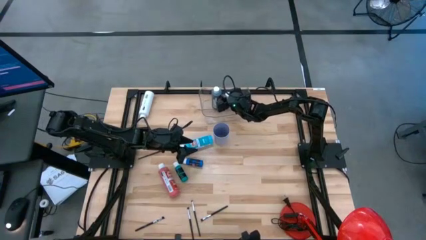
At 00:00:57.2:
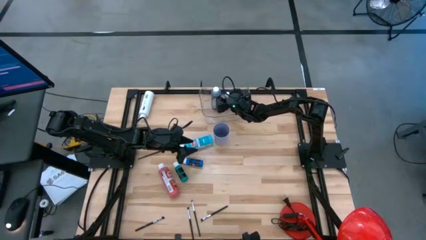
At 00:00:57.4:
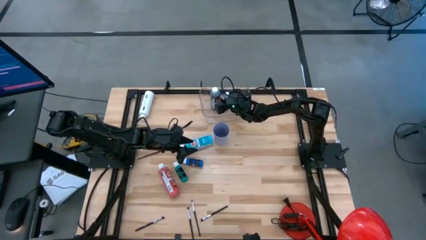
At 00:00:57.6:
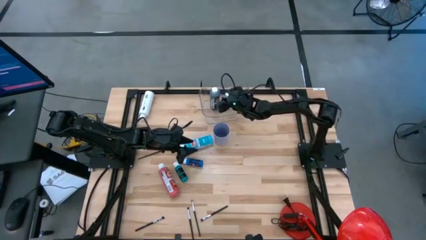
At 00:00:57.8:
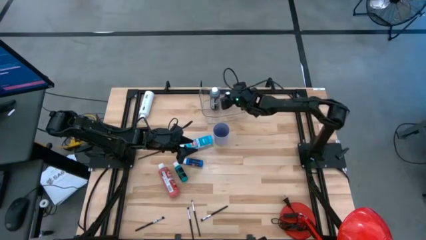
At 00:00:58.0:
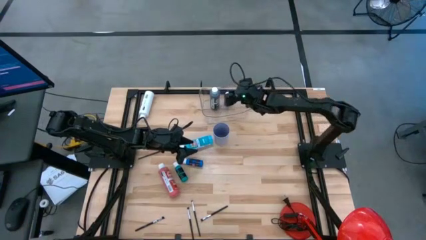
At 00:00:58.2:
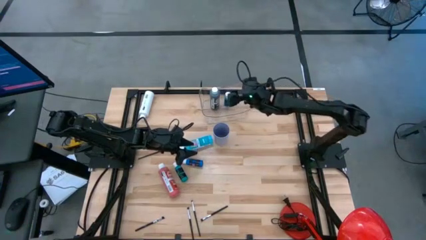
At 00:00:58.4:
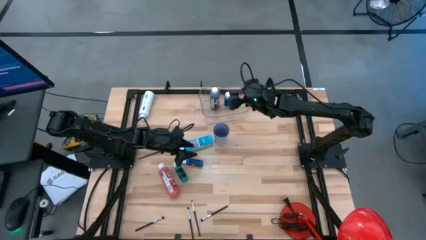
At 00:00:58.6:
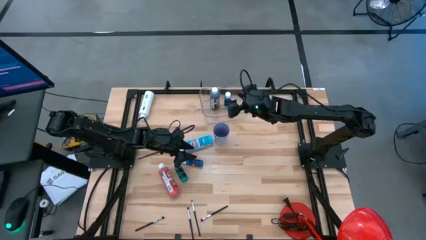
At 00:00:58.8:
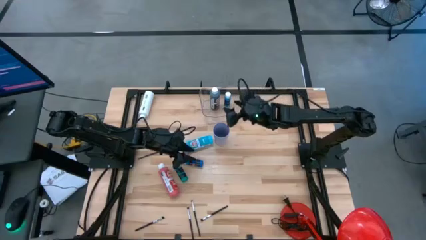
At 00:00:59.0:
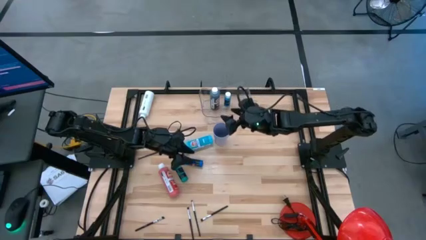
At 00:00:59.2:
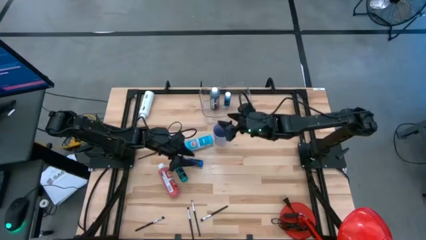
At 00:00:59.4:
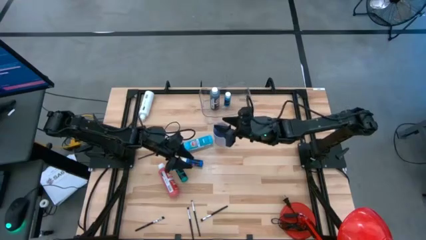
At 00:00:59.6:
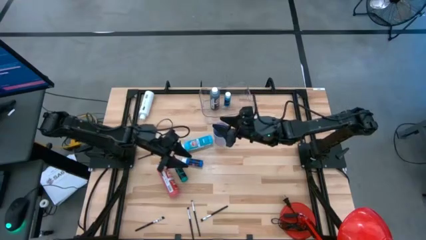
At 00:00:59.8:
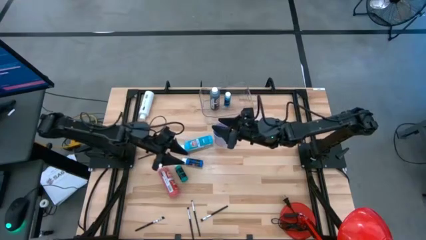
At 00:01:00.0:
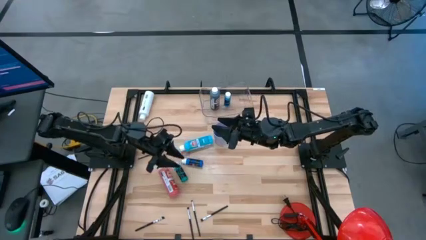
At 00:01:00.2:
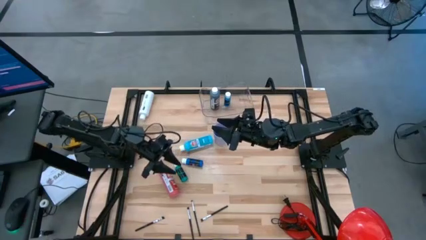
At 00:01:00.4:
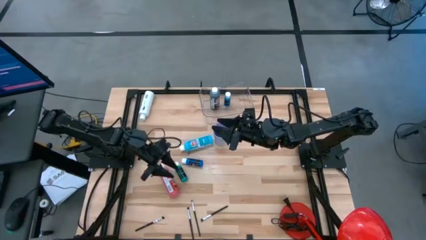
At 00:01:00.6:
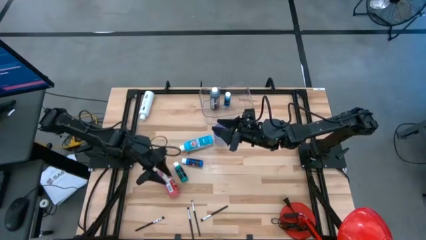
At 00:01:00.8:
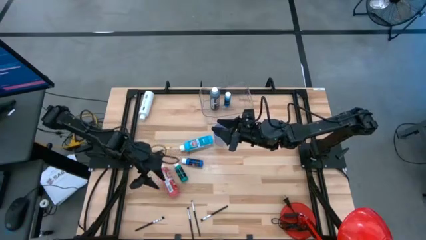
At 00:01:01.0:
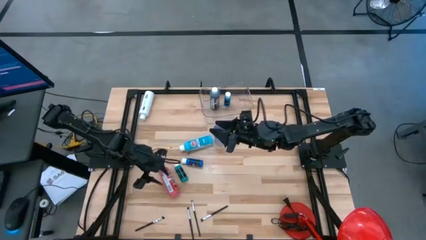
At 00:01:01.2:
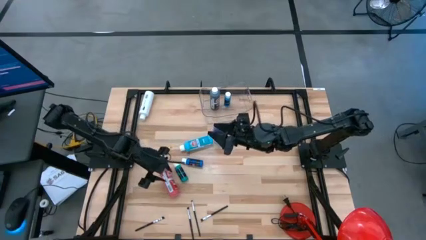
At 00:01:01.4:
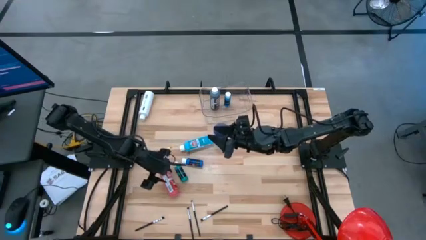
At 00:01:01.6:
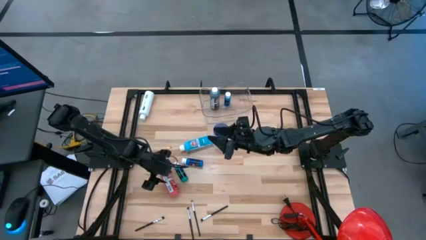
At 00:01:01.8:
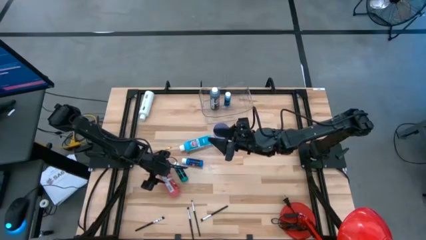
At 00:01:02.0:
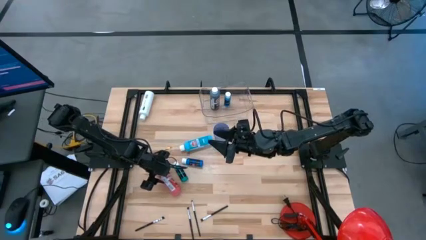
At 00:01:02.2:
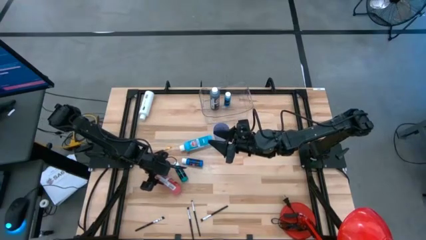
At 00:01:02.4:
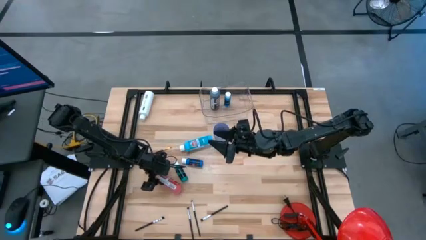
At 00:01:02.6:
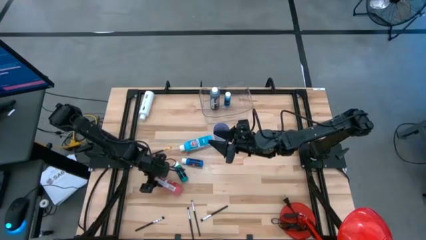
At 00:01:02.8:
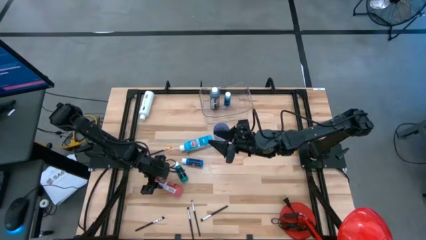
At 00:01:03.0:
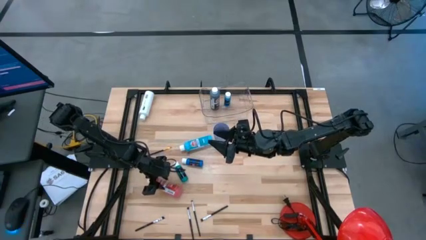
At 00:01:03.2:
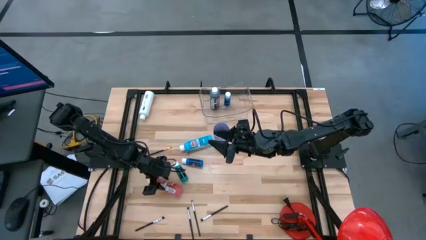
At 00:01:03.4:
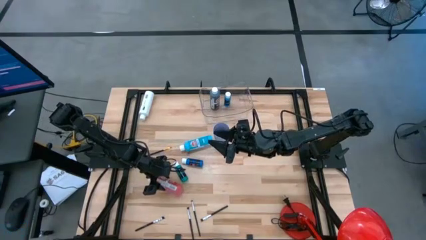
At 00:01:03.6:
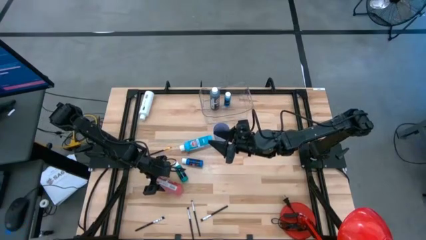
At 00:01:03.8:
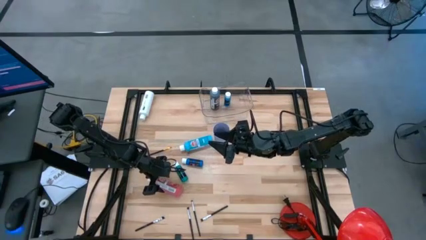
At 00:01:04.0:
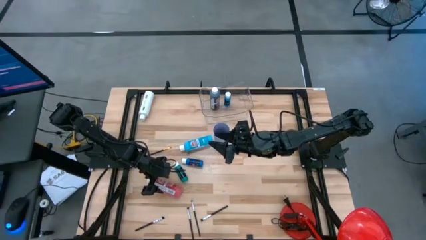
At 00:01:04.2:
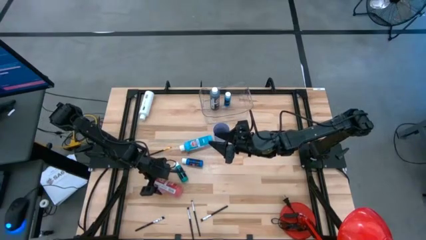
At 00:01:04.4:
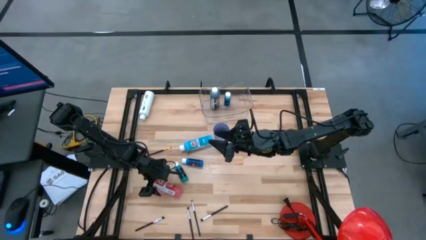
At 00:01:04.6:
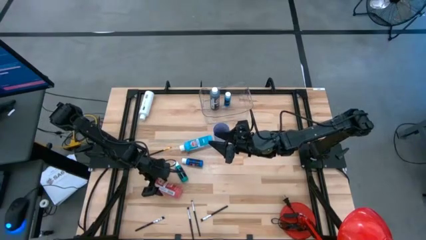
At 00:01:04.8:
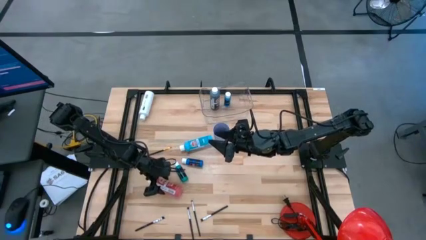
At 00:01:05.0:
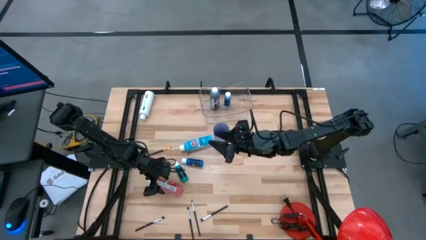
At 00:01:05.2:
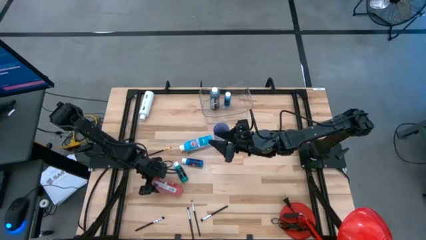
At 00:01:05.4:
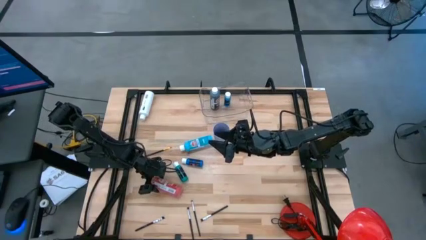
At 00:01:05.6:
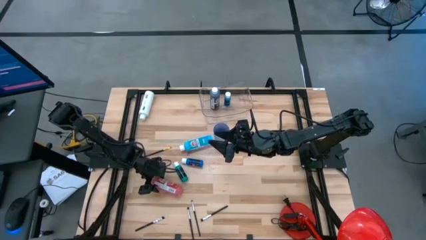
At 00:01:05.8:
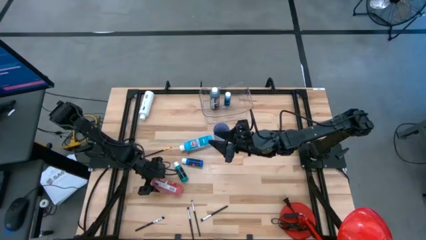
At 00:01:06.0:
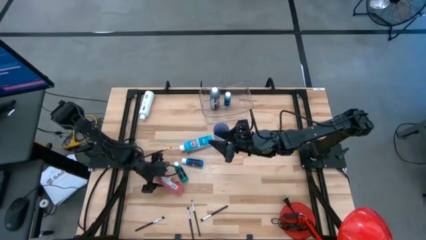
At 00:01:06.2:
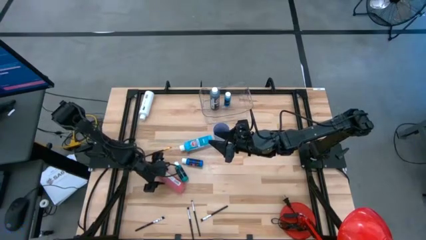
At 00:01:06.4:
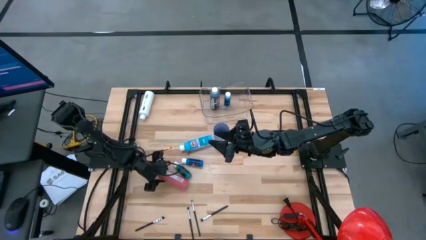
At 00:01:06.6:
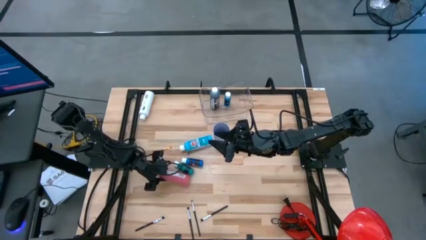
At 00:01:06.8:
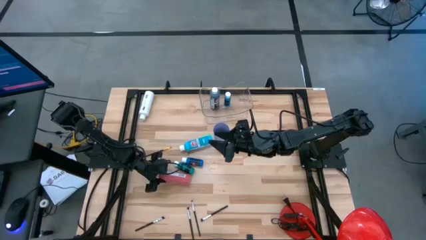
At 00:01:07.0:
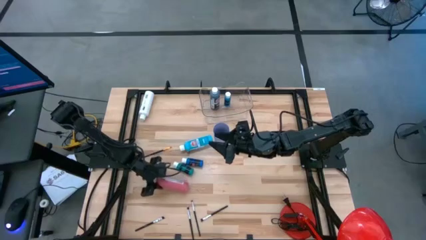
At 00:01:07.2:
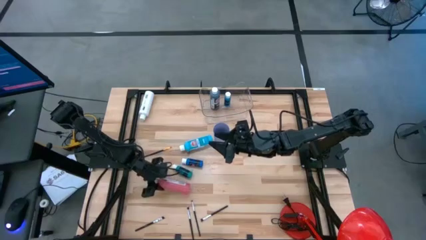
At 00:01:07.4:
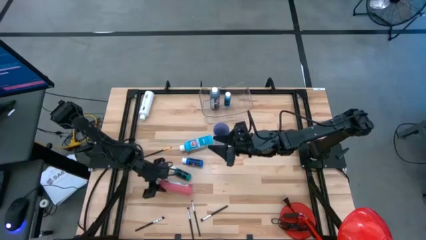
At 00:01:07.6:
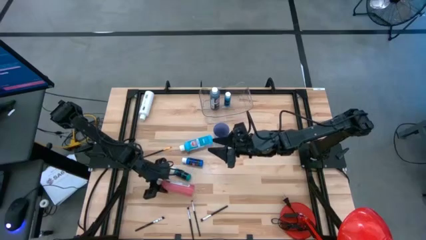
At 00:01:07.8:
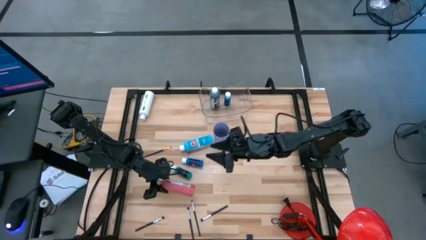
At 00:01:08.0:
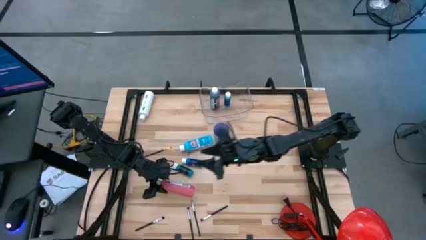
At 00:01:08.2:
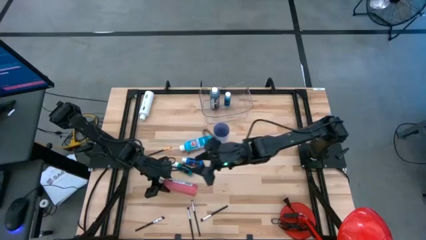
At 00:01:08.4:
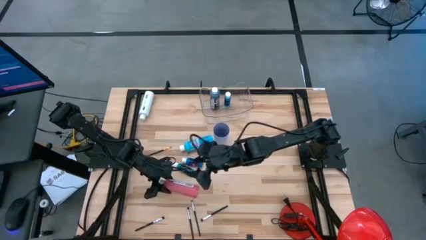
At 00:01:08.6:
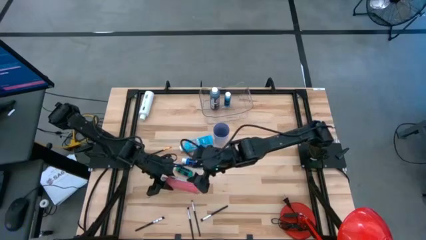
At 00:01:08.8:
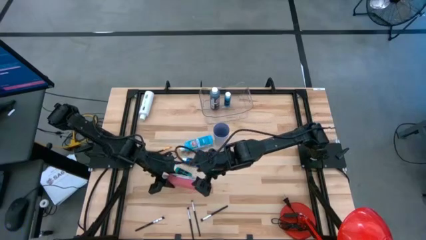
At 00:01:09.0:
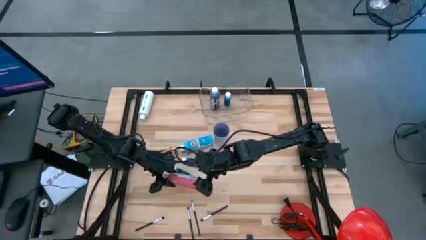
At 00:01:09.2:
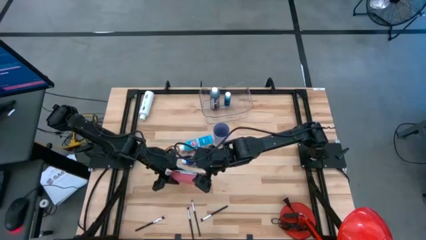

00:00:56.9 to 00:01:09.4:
Task: Pick & Place Paint Supplies
Put the red paint bottle into the transparent bin

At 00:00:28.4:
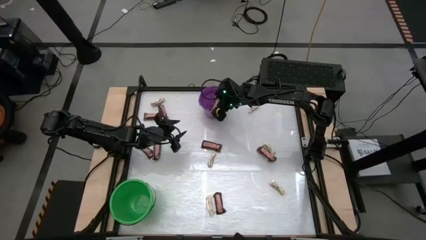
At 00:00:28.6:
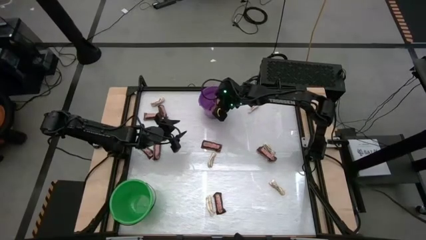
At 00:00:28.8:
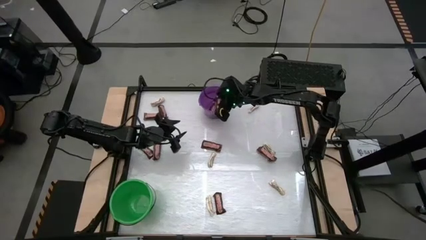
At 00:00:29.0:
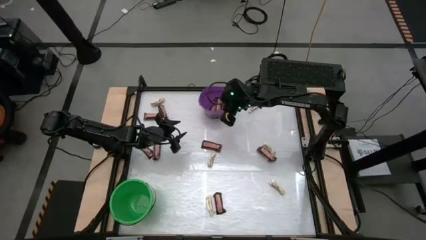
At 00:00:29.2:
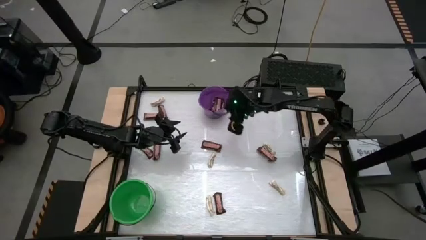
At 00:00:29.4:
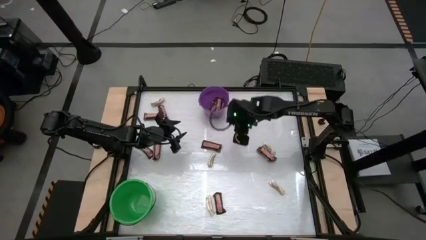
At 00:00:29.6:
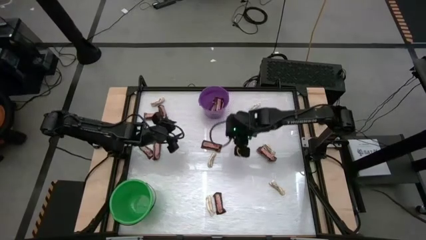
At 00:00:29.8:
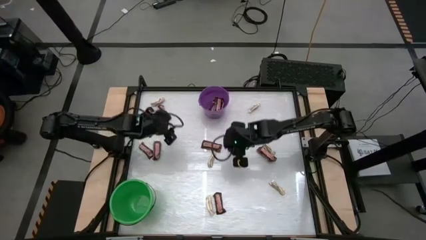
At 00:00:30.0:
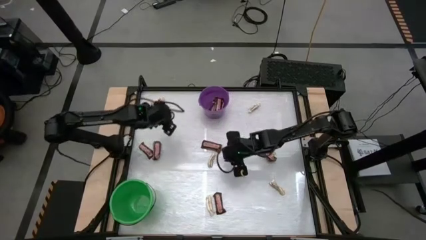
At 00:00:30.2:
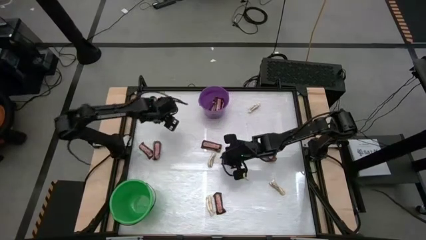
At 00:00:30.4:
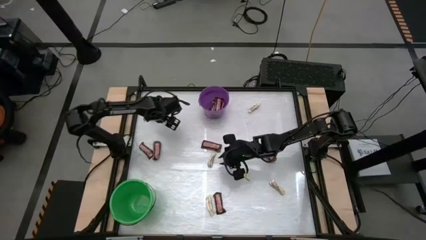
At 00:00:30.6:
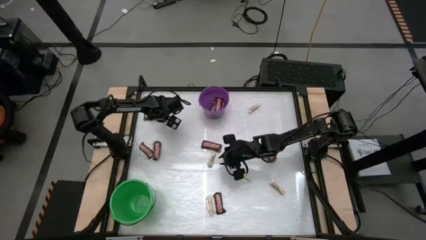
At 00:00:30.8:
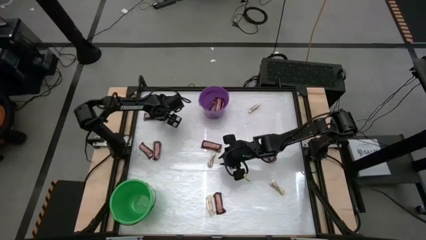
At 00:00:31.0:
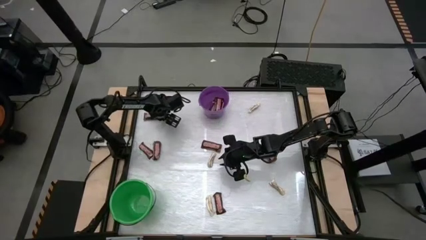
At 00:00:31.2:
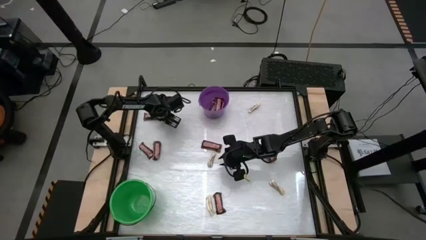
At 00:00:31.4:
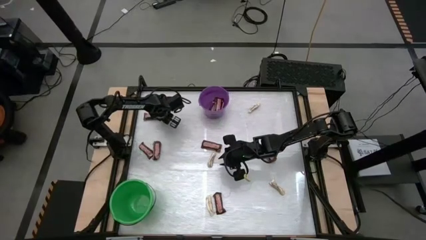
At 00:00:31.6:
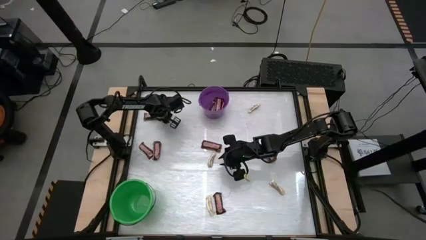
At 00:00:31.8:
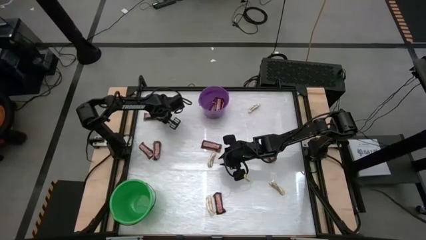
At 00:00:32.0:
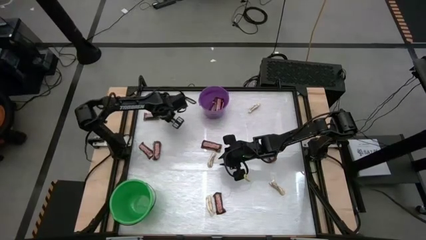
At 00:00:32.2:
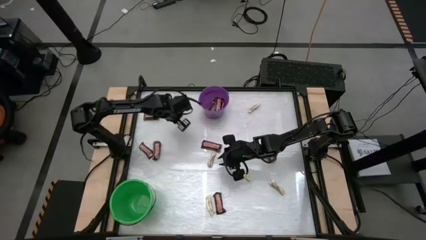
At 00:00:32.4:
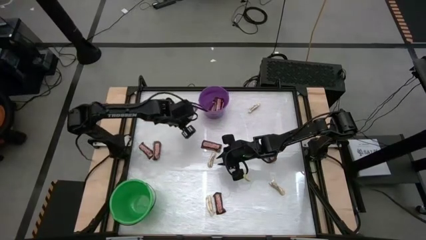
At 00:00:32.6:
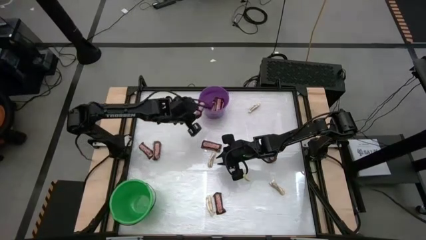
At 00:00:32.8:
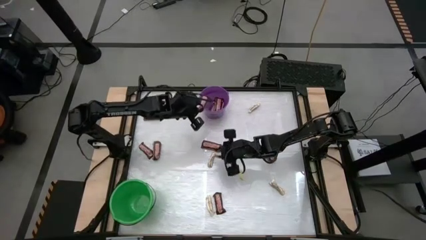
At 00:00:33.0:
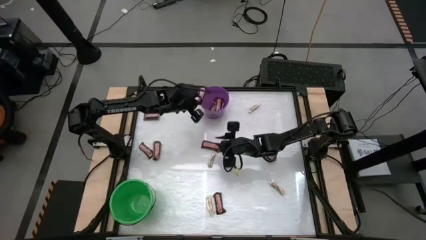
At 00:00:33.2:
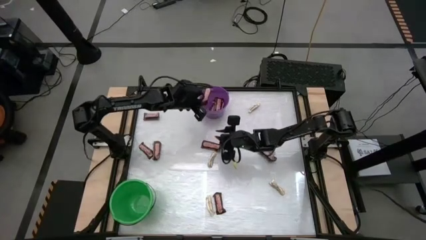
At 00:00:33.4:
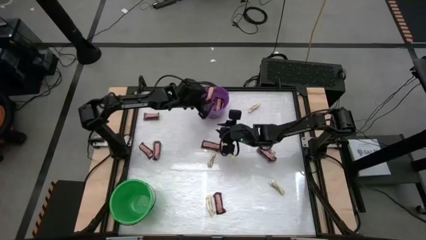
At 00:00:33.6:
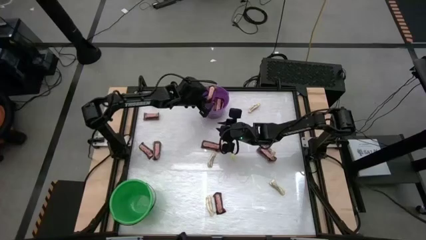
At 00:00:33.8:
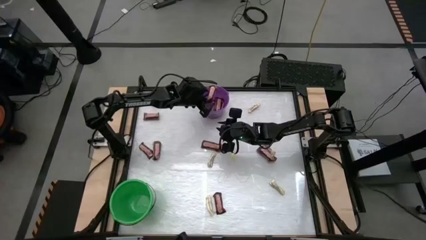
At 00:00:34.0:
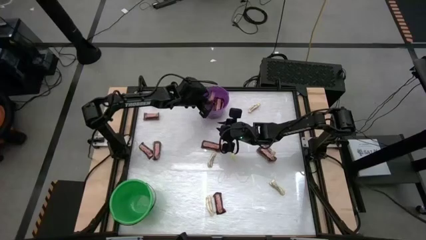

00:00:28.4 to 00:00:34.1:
Task: Sort candy by brand, put in halloween buckets
Put the brown chocolate into the purple bucket
